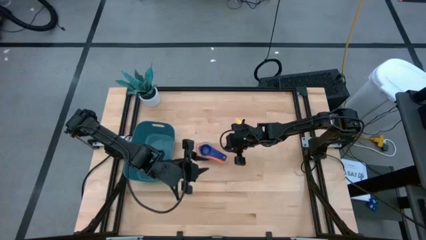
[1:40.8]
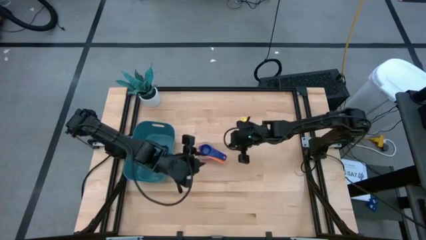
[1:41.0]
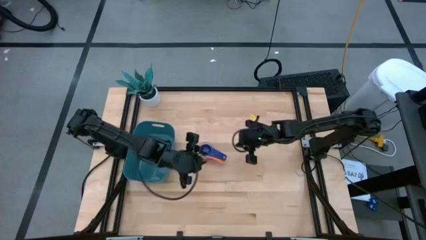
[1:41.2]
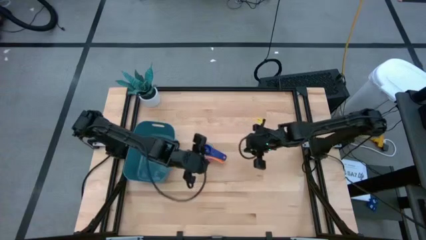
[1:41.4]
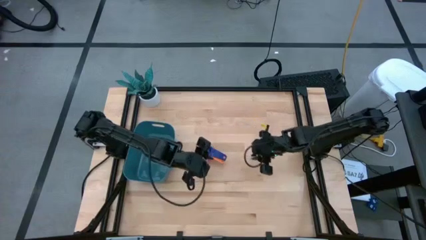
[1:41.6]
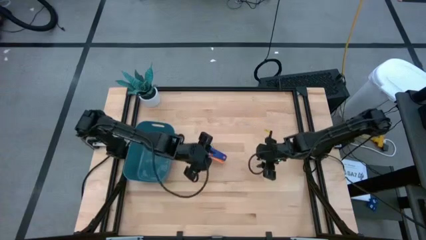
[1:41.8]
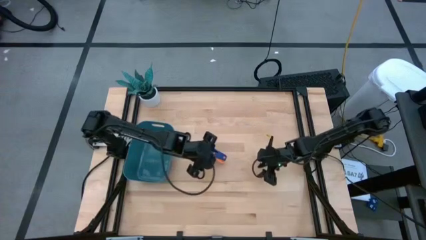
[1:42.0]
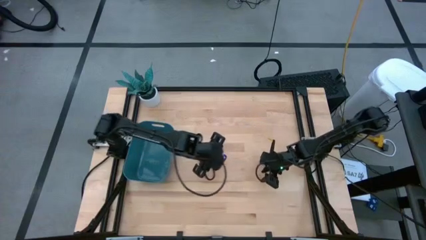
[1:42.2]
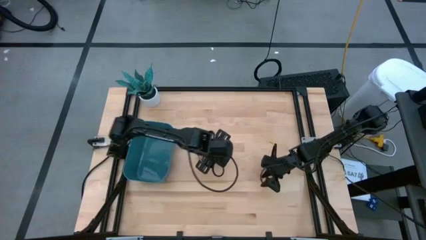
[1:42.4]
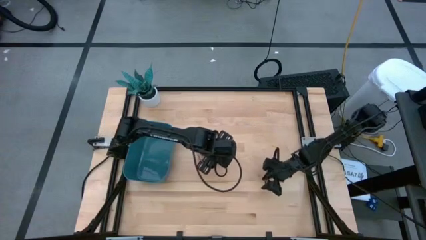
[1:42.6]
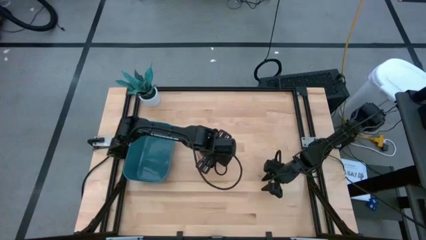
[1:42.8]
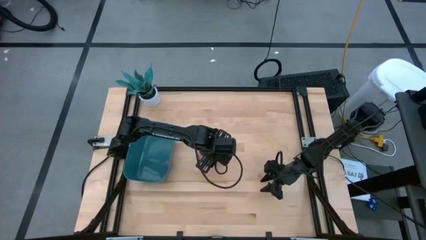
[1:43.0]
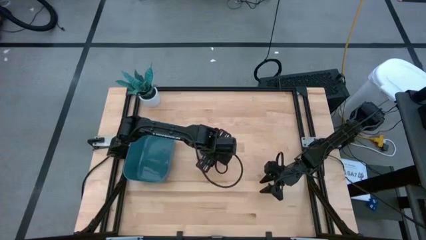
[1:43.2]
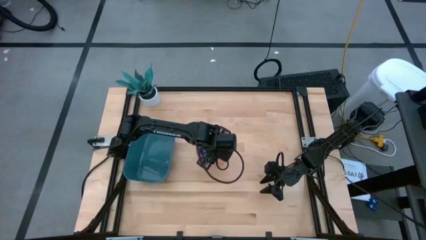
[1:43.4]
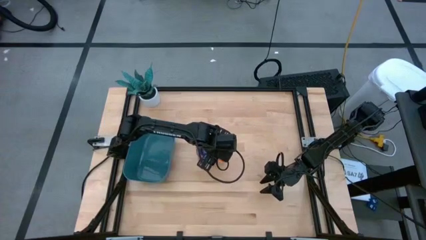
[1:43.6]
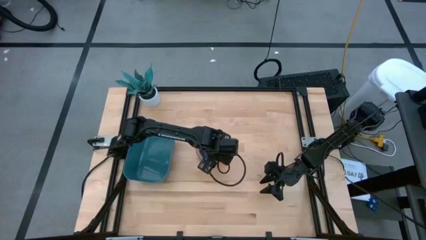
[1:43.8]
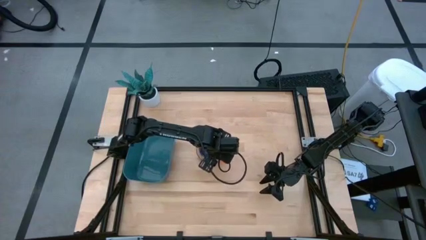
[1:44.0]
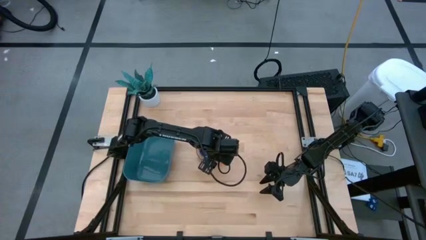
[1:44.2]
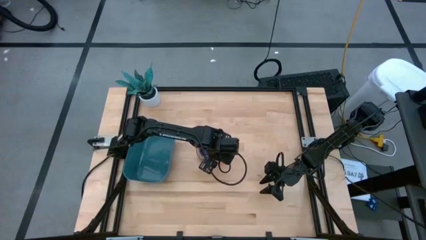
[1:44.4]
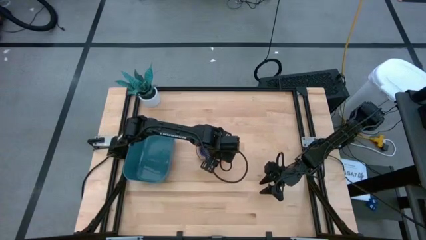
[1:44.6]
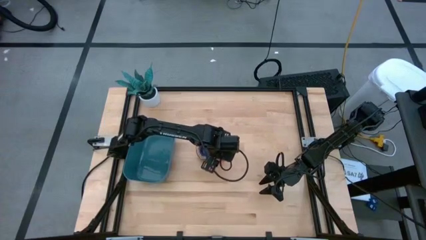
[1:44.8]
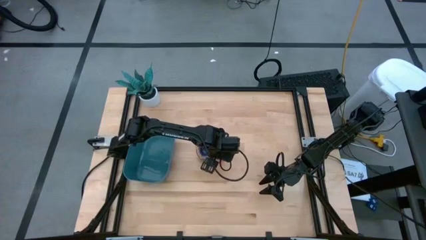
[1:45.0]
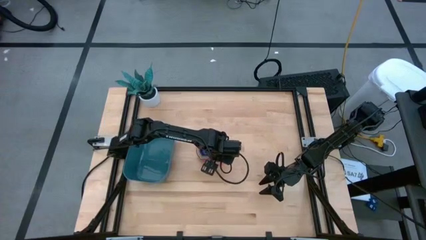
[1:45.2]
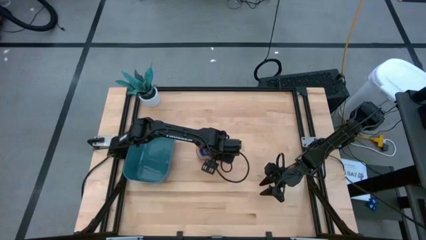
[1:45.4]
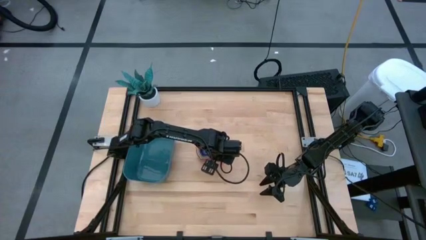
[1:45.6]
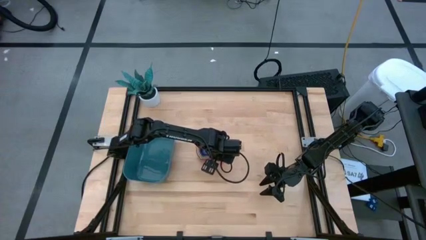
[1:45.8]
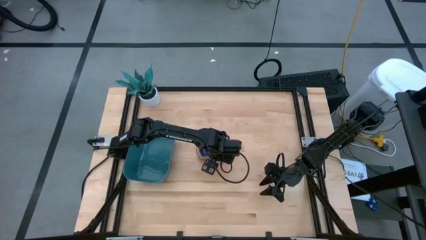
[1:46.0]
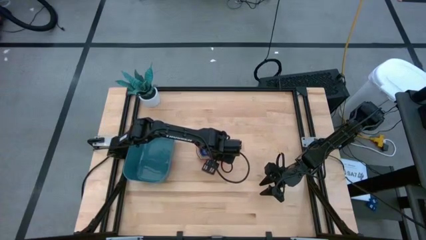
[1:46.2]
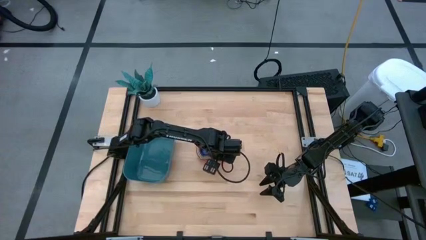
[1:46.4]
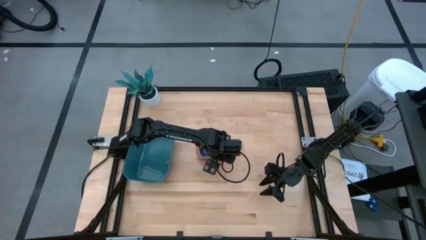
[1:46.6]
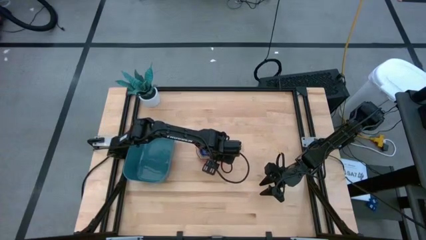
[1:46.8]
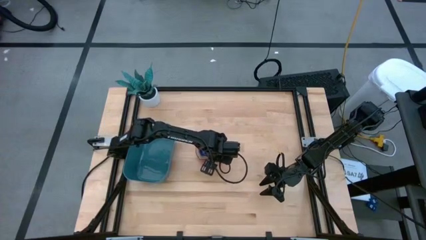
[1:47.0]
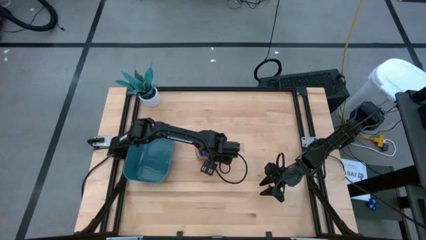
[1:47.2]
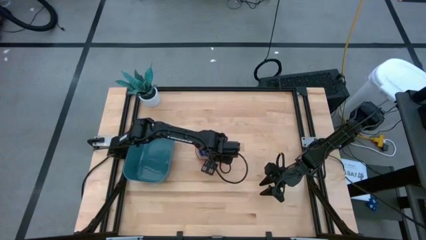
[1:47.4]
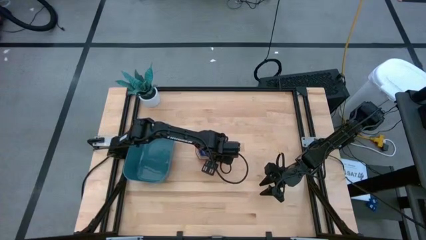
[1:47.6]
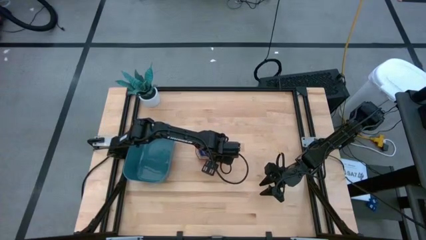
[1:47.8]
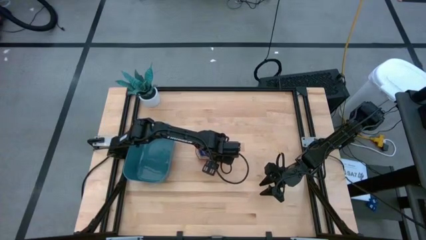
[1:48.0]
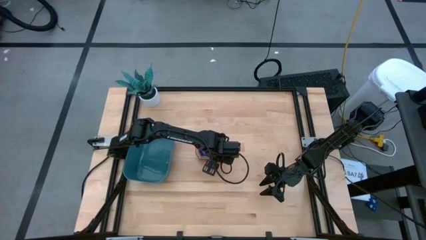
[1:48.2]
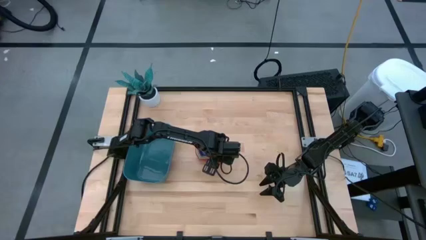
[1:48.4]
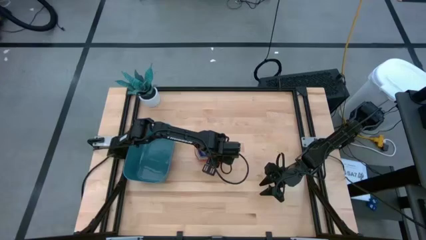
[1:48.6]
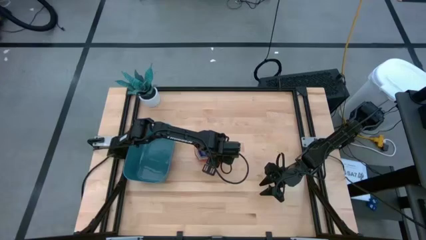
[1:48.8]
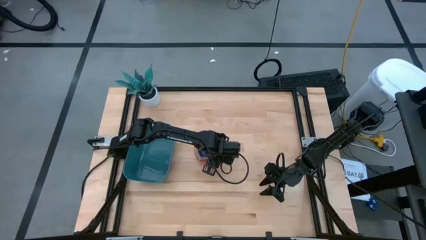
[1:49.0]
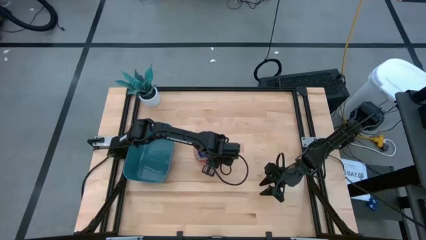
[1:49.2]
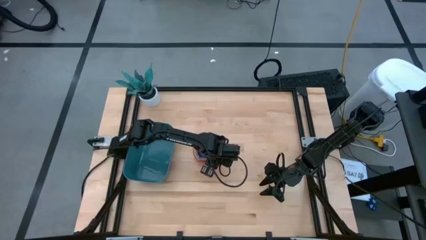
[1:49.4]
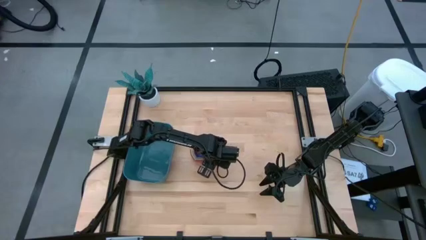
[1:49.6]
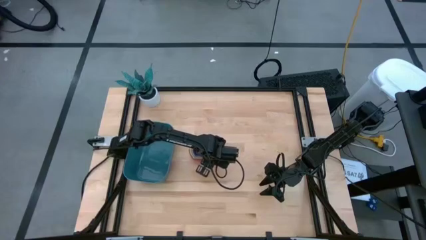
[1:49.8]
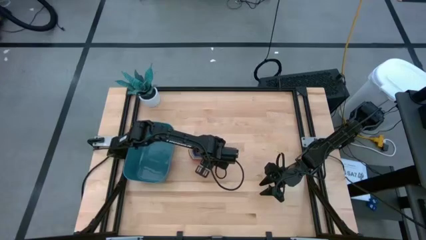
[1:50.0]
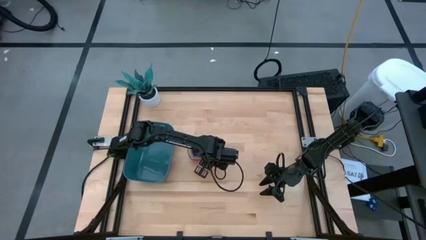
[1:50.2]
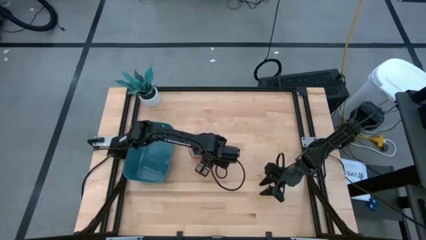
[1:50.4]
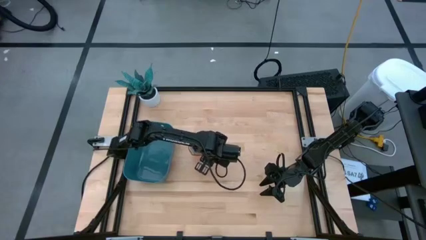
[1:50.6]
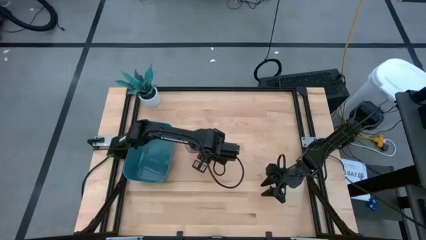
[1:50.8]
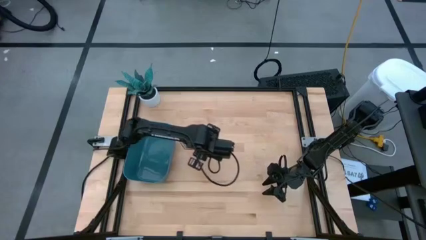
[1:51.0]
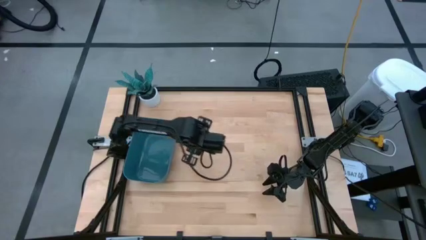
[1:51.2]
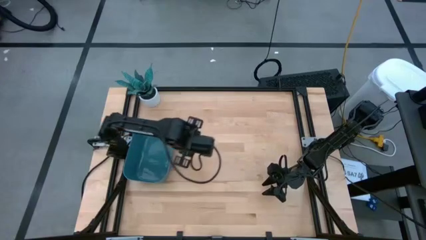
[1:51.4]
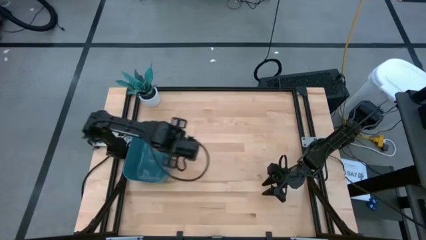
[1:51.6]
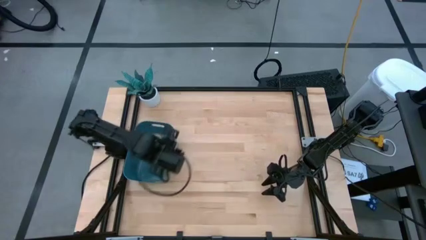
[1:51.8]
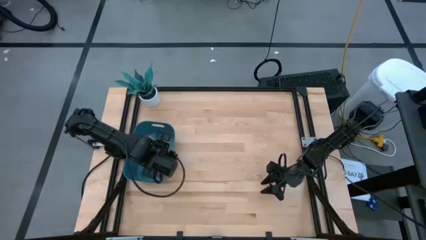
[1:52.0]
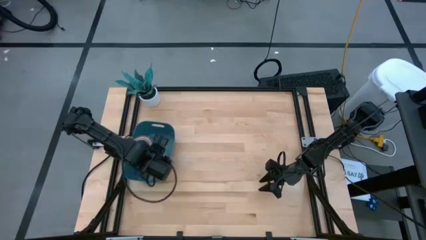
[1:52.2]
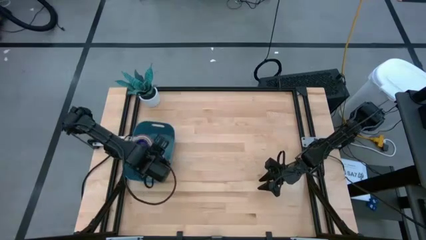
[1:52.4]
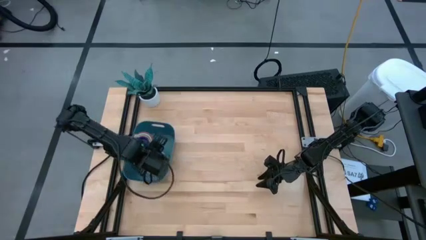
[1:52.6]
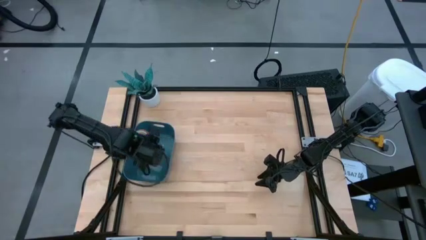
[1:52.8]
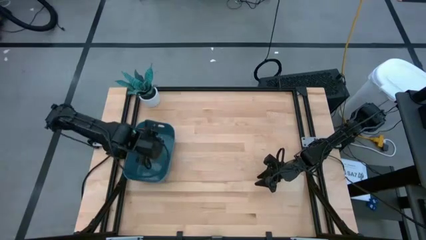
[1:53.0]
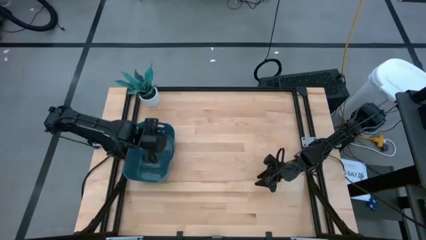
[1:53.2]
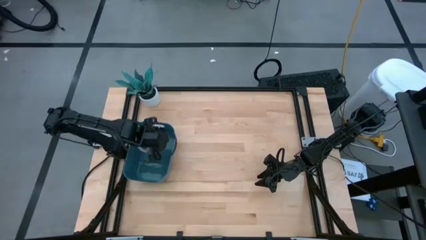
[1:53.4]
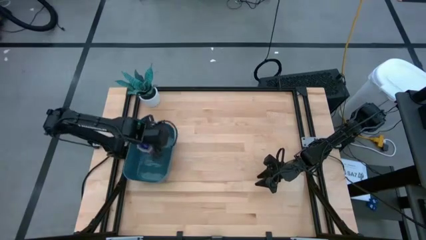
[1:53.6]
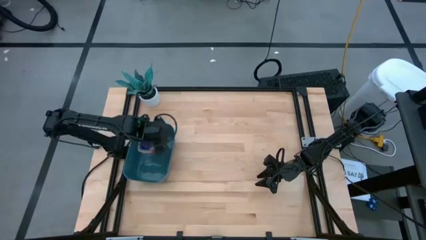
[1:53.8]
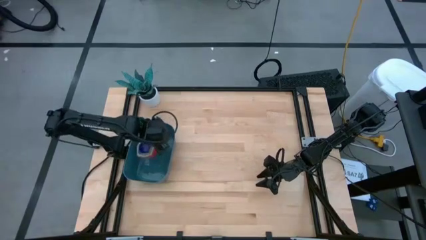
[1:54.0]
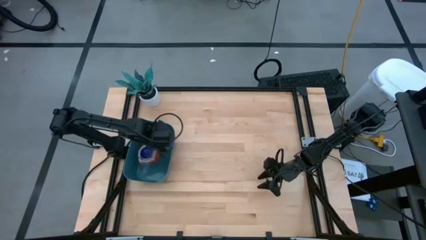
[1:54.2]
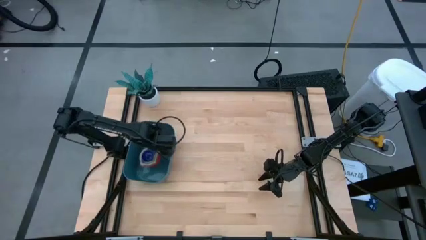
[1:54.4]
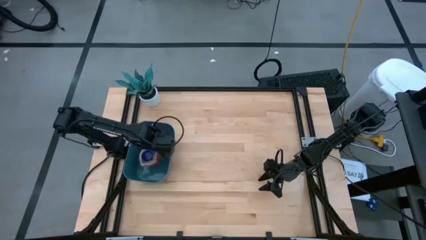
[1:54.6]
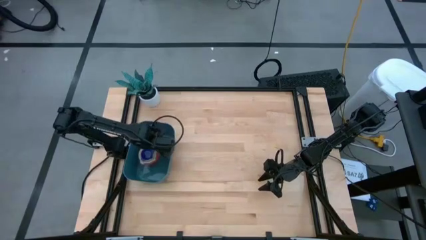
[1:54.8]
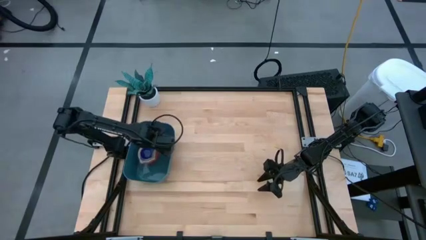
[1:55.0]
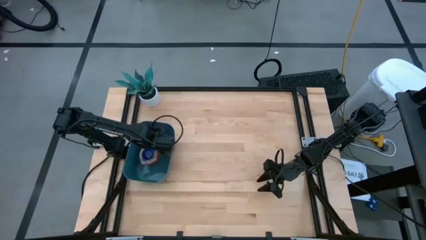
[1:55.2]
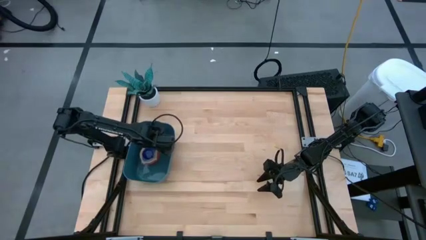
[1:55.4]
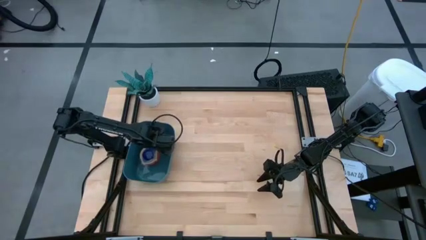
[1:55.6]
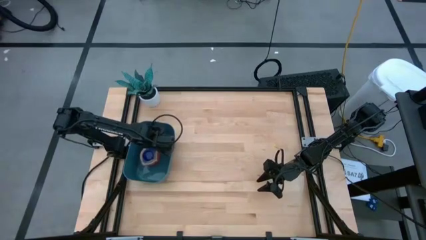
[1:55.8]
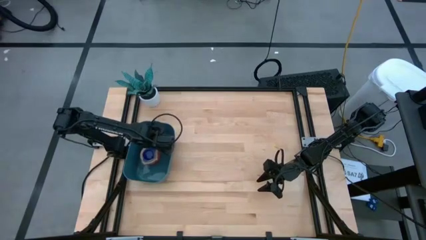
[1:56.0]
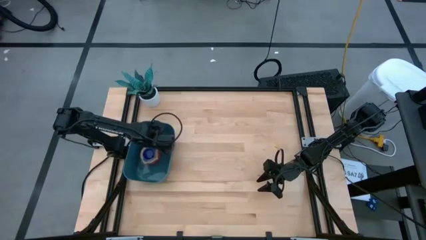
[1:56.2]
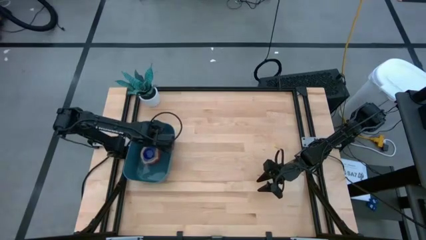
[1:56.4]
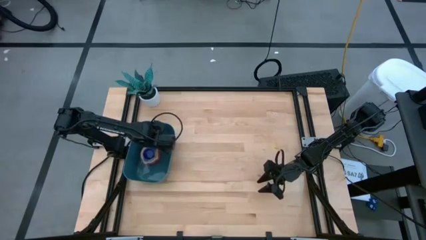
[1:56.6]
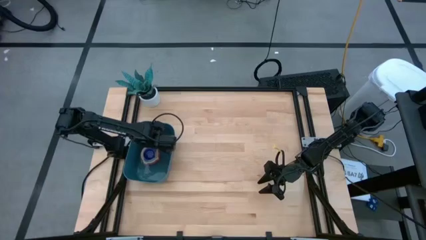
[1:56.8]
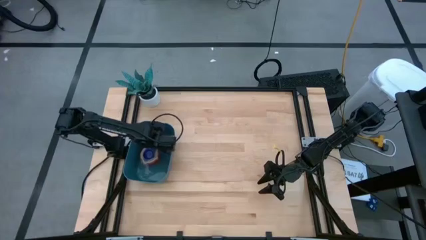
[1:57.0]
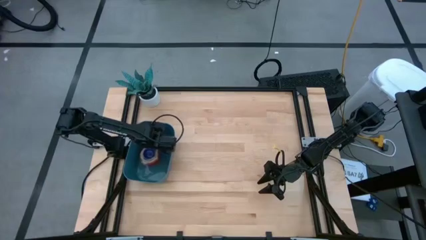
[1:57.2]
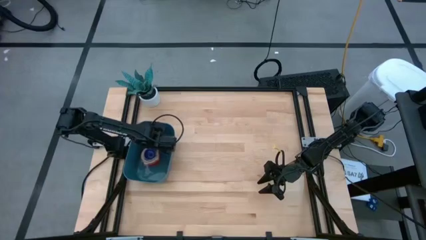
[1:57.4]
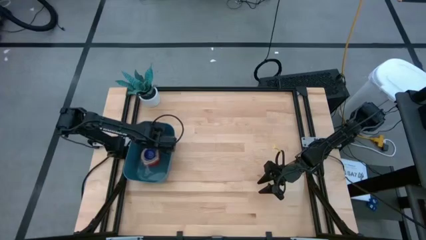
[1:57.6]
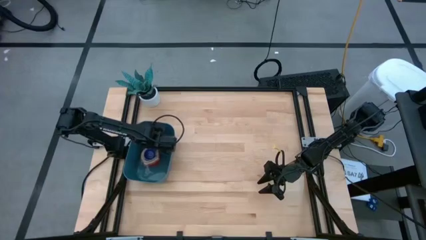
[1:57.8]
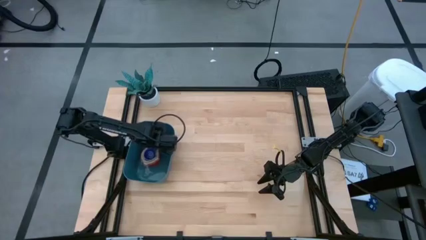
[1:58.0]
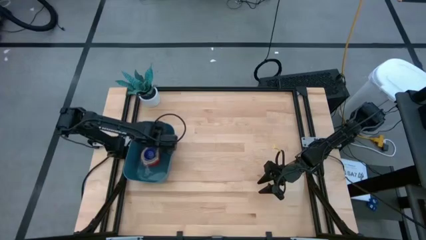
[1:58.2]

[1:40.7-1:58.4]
Task: Nest measuring cups in basket
Put all the stacked measuring cups into the blue bin
